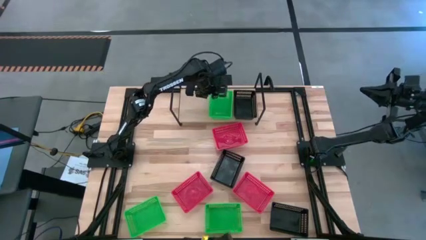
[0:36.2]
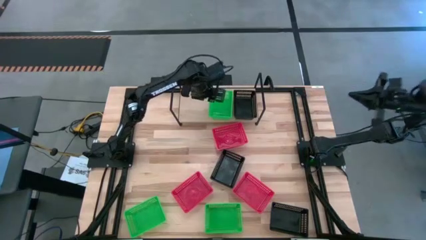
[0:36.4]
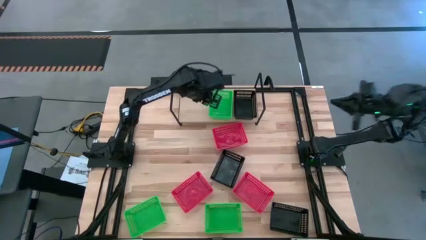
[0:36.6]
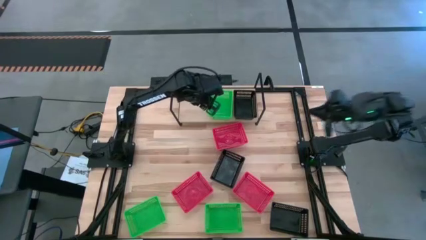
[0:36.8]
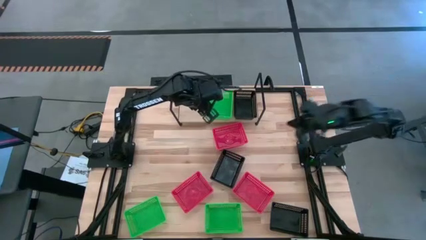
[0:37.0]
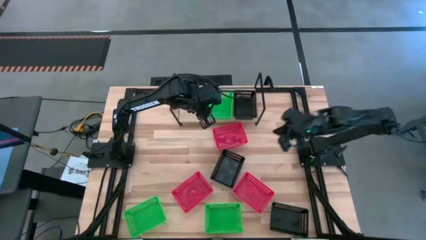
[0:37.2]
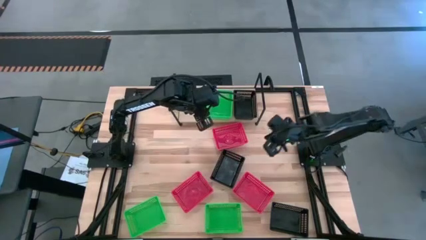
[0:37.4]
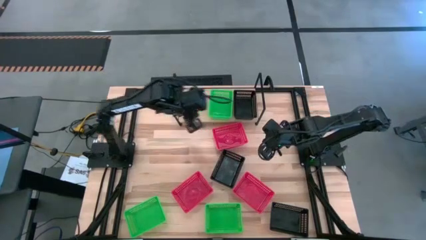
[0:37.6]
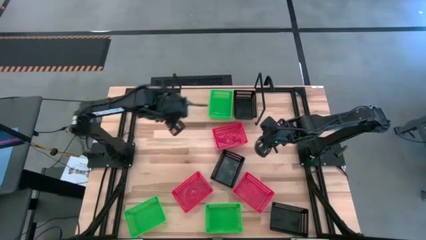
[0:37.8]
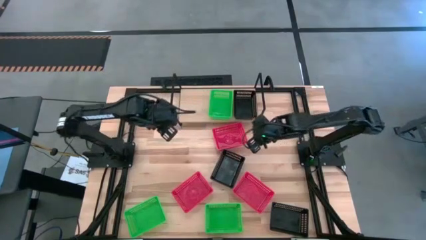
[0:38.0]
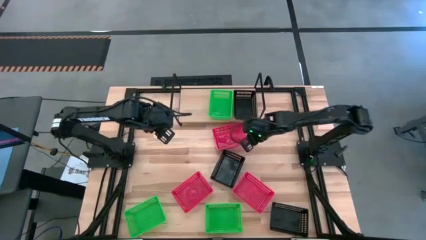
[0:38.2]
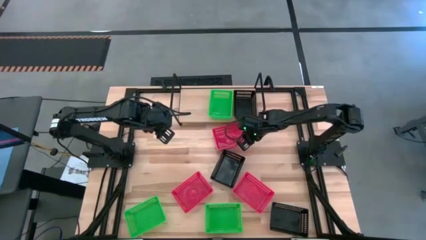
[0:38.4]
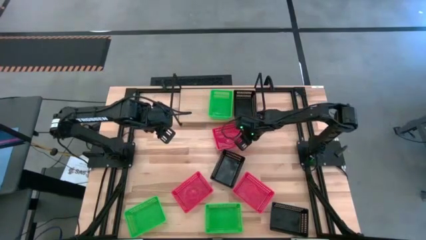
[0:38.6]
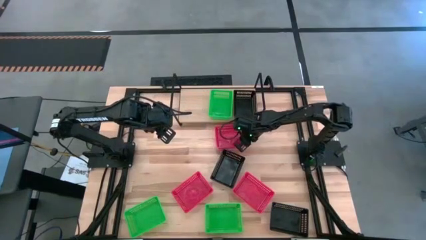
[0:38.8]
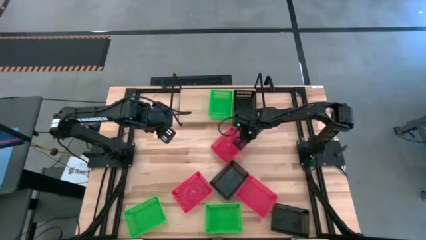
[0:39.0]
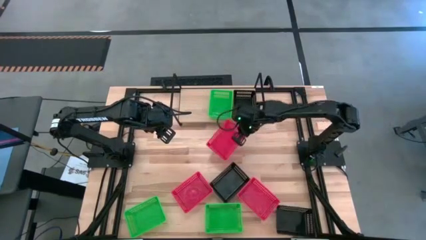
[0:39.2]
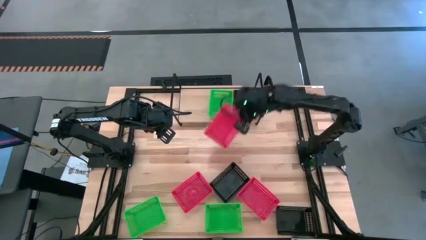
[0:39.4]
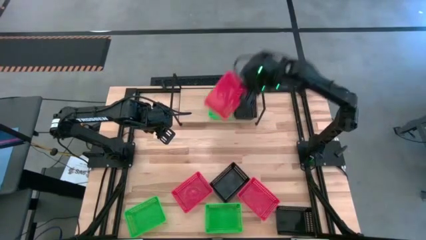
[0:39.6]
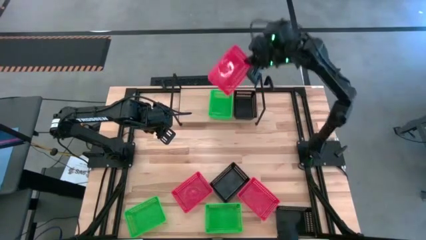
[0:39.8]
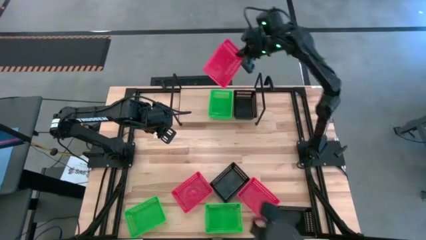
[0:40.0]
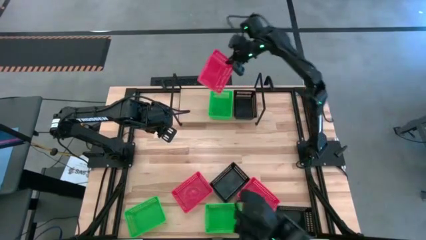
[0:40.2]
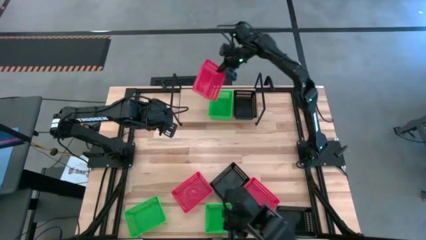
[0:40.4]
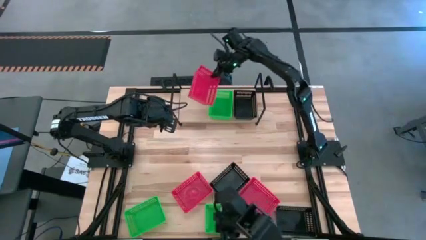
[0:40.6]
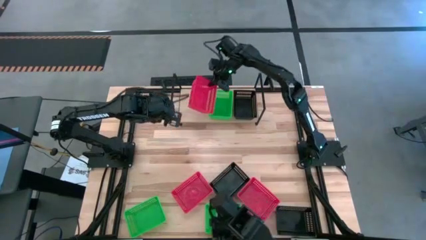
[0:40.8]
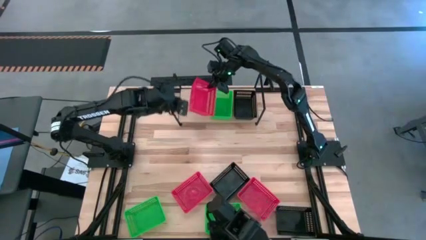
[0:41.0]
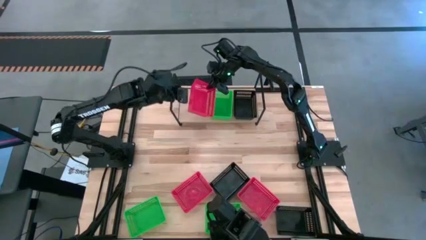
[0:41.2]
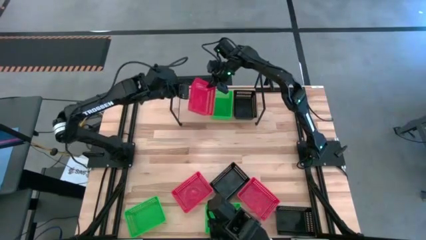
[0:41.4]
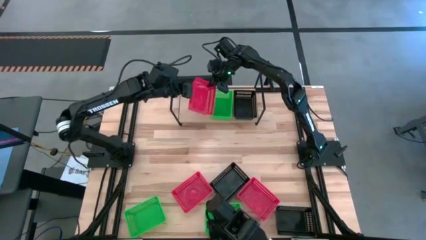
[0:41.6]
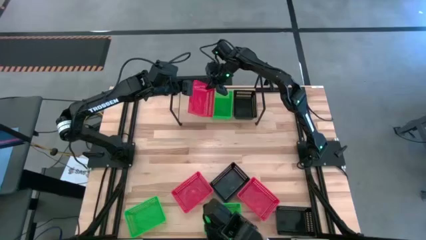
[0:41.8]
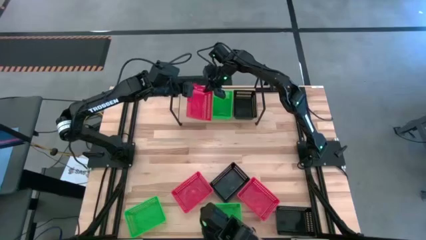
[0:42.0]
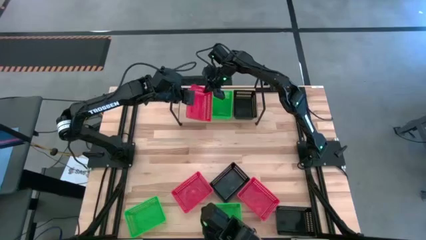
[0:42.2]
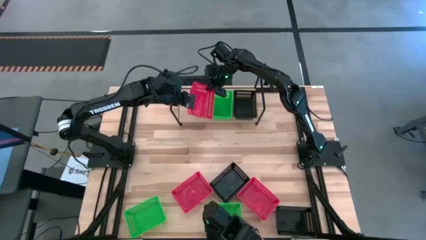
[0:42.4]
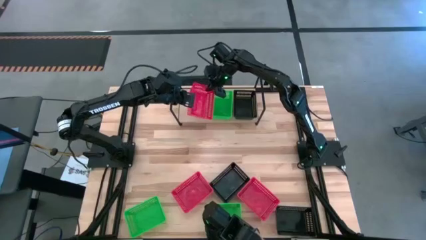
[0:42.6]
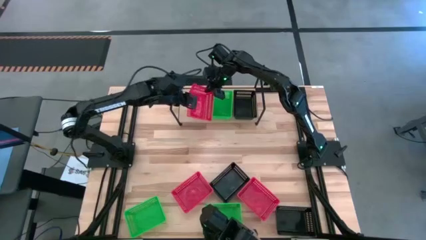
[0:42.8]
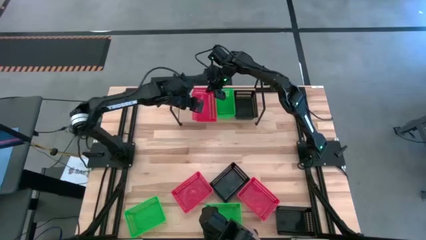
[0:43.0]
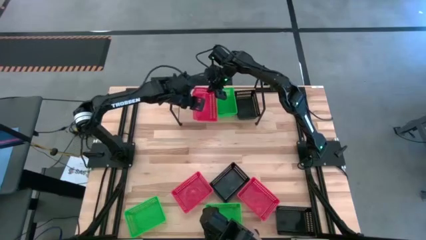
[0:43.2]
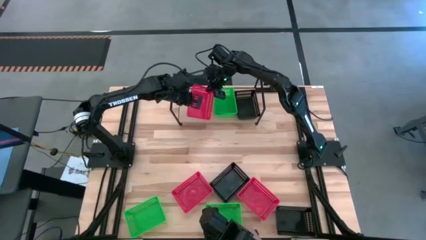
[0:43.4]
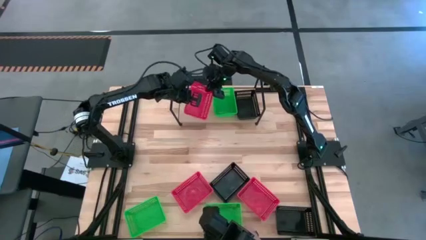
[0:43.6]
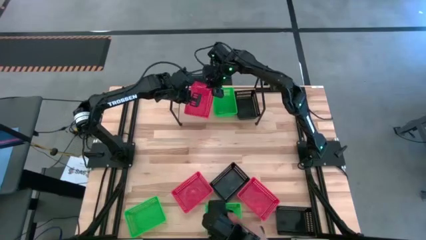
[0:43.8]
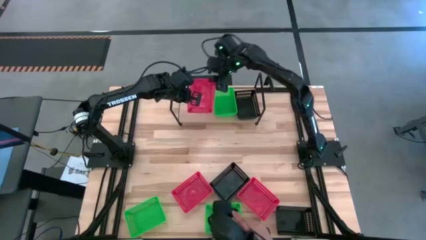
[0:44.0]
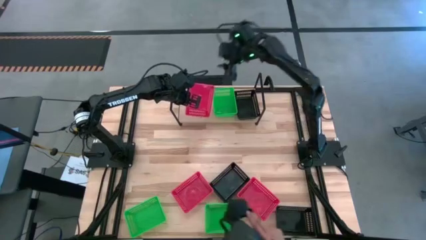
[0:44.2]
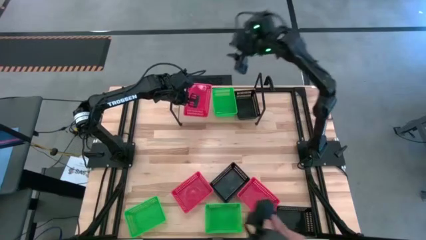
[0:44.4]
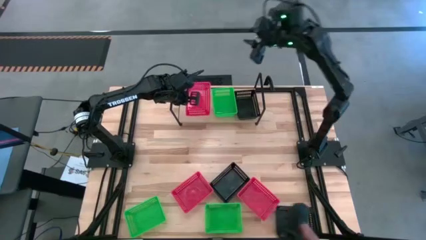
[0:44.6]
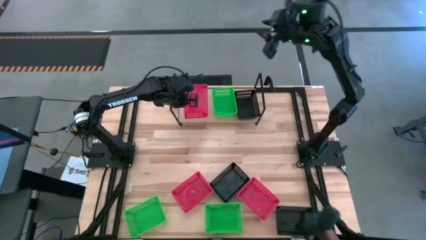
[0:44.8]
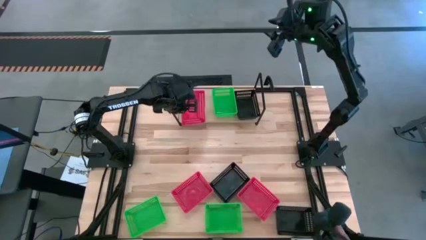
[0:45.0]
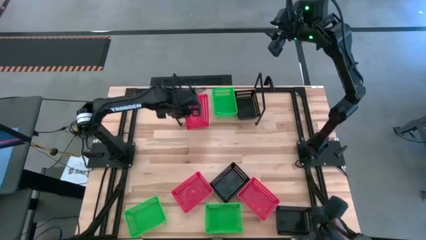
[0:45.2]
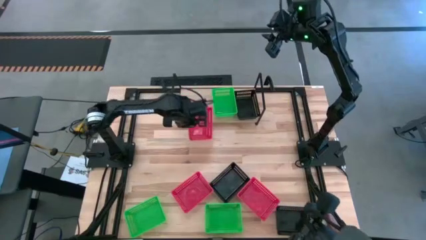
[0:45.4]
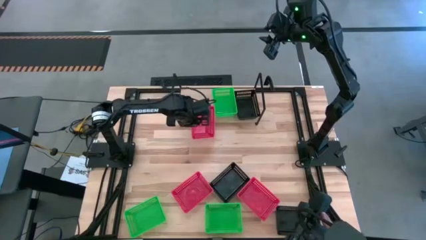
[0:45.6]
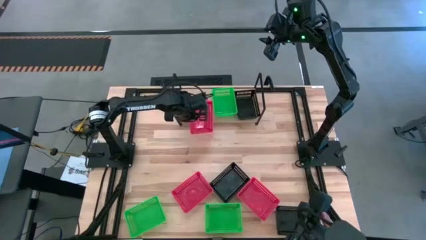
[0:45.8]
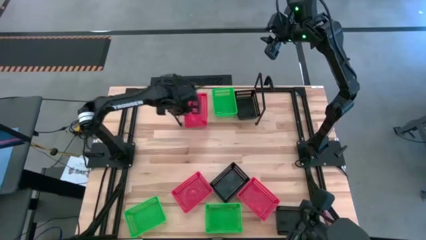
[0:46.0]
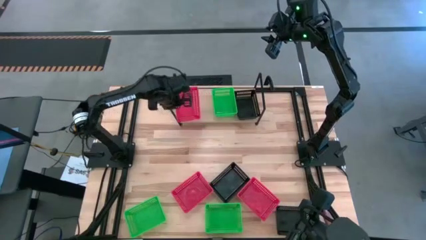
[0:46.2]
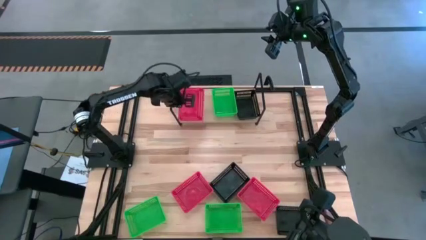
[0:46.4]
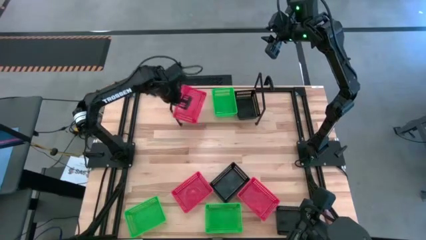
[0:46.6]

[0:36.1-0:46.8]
Task: Stack baskets on shelf by color
Put the top red bin on the shelf

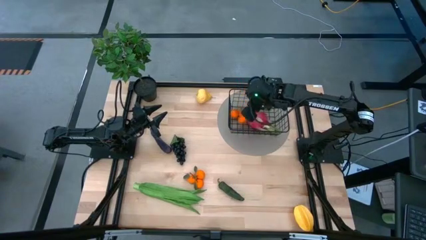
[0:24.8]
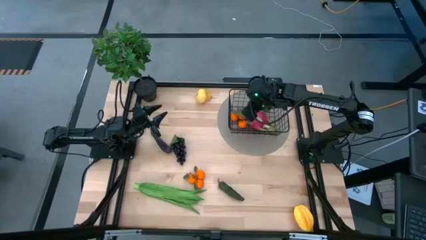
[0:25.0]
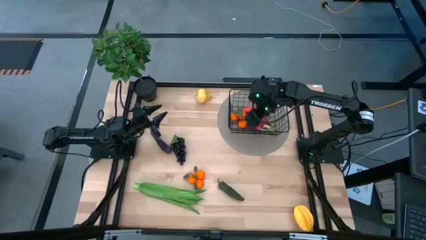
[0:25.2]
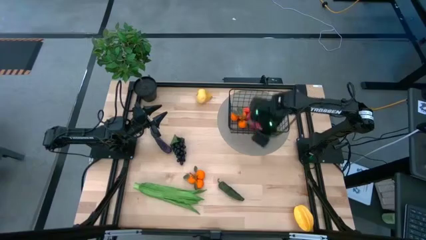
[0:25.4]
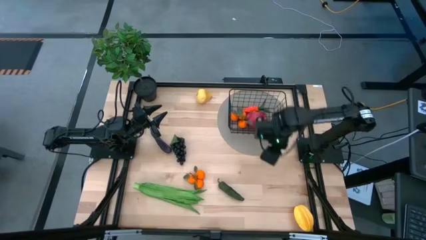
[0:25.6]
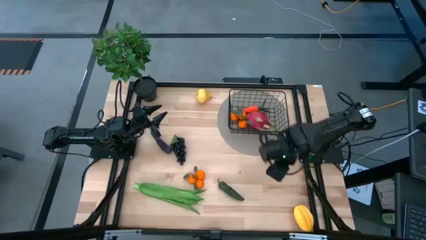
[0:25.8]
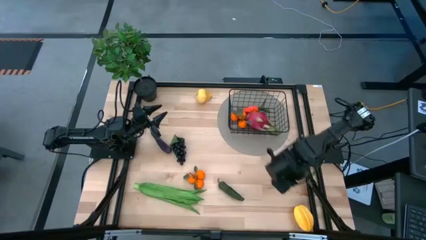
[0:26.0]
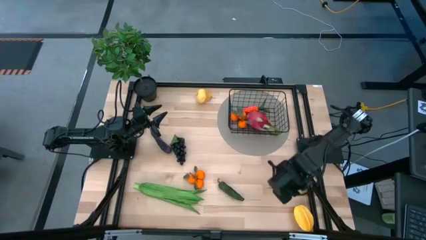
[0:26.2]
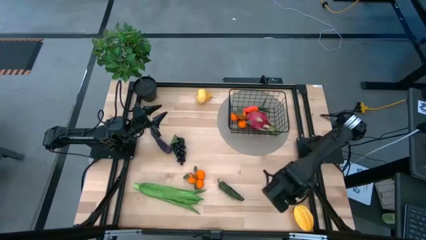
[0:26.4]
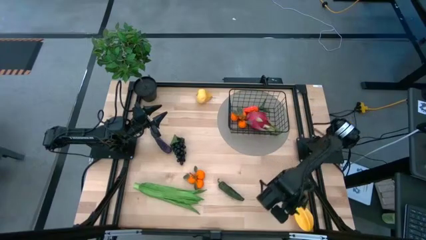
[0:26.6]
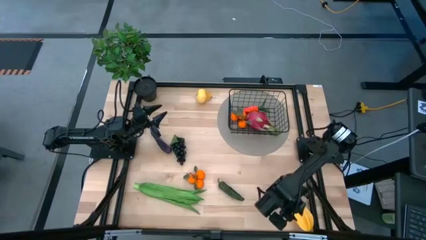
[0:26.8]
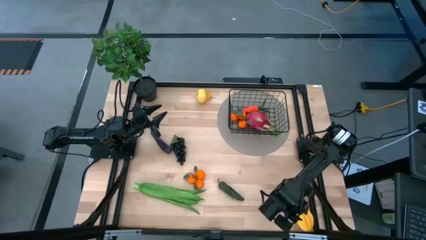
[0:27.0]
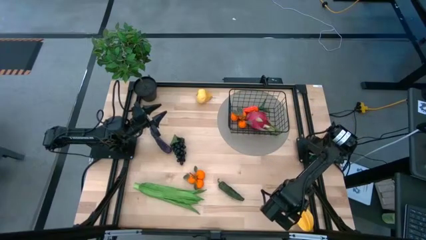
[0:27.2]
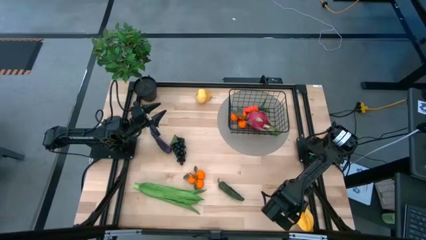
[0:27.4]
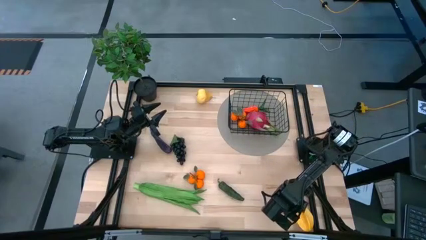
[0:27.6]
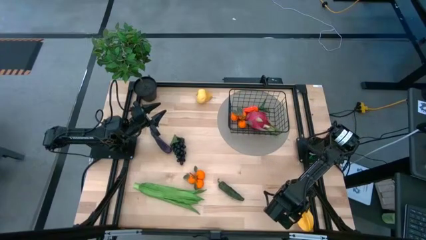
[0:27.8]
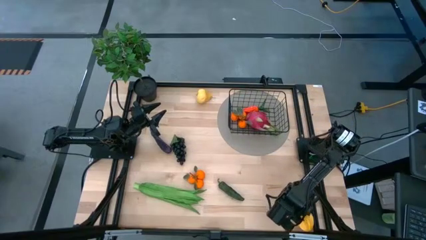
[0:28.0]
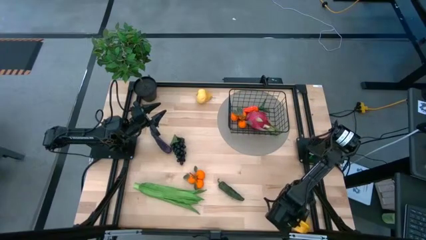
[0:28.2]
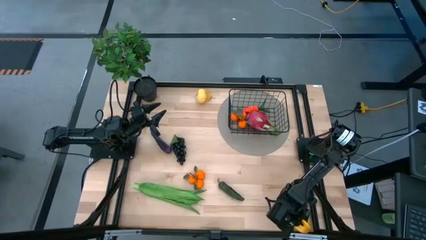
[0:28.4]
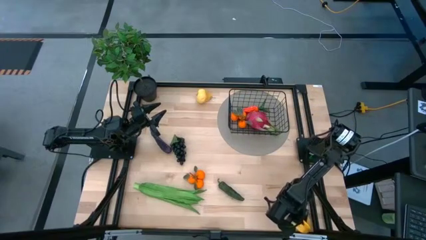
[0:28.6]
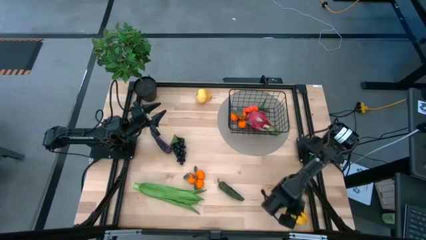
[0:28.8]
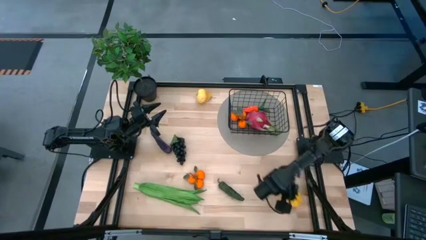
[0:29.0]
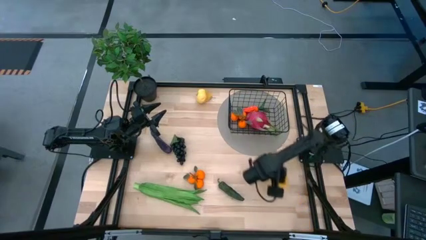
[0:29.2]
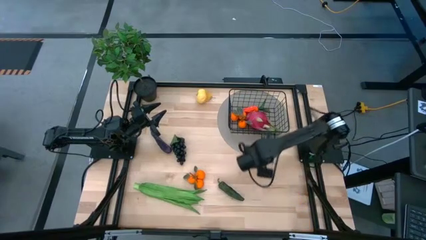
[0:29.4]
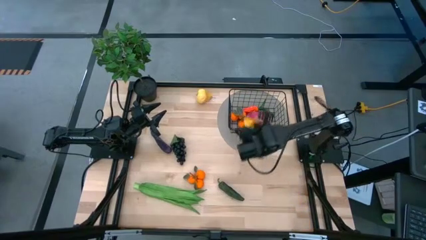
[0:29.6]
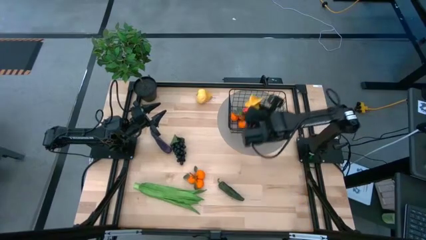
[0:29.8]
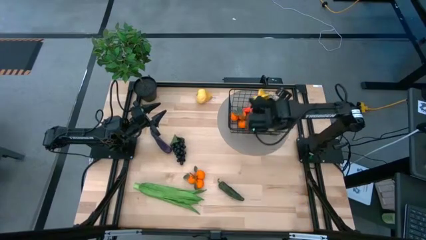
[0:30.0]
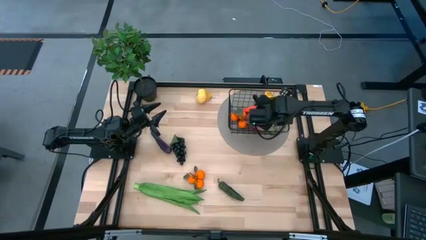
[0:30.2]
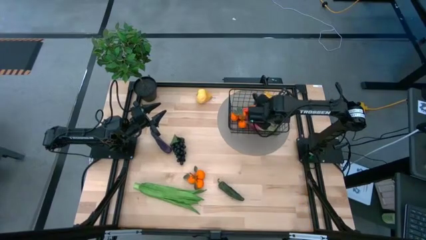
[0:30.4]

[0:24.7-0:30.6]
Task: Build produce basket
Put the star fruit into the wire basket
